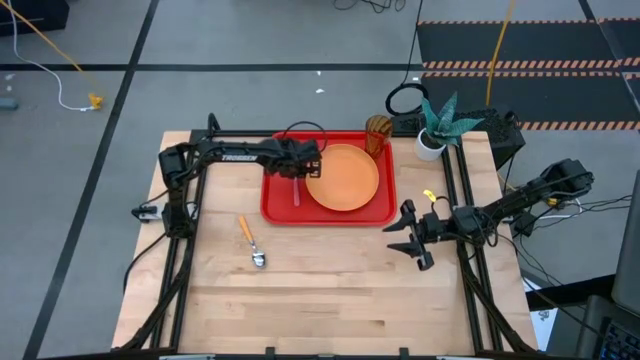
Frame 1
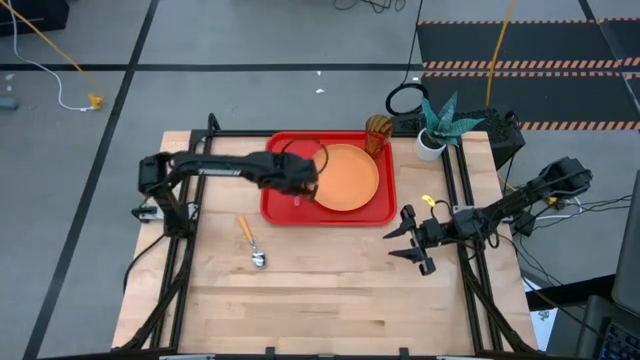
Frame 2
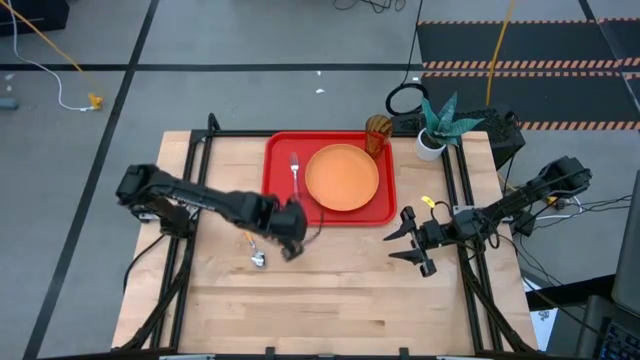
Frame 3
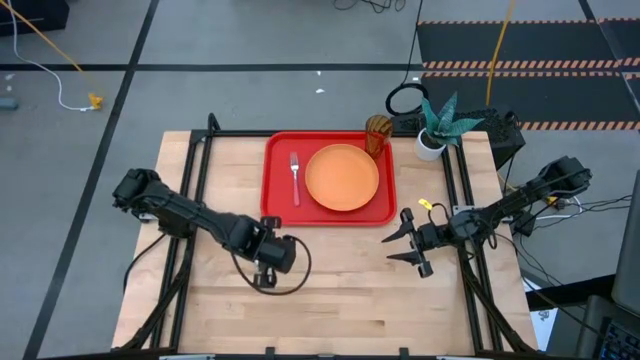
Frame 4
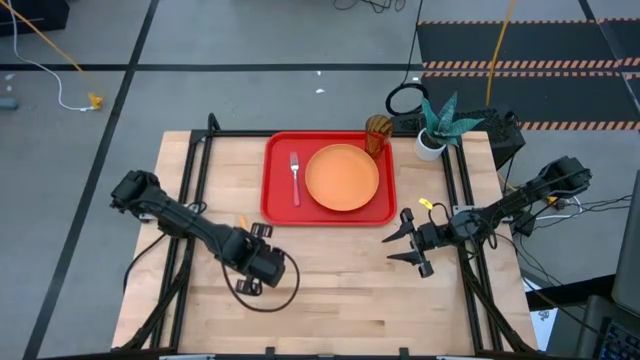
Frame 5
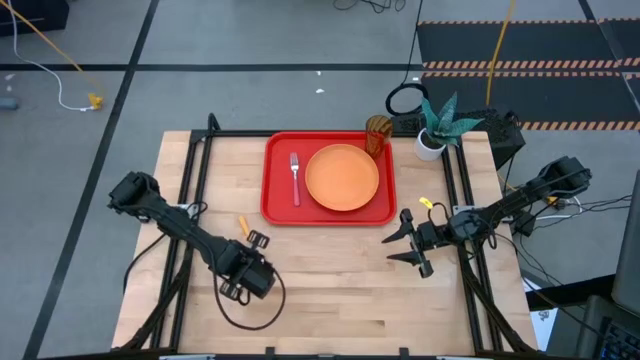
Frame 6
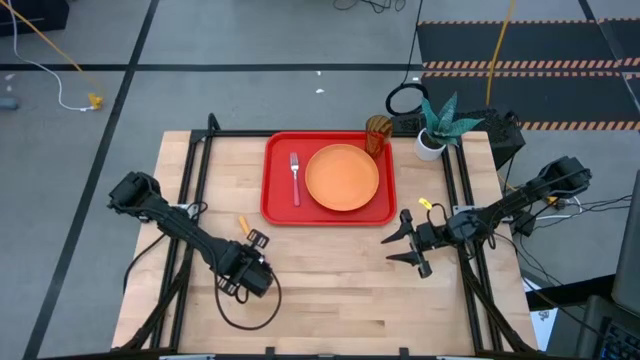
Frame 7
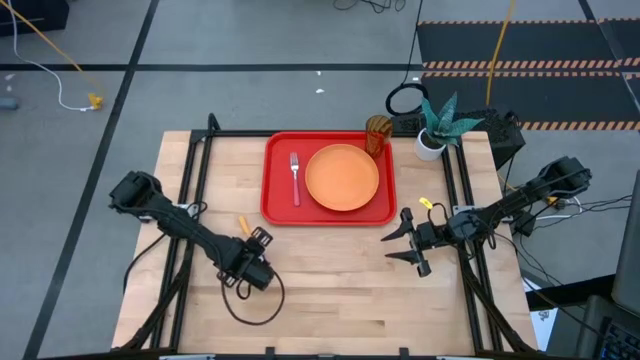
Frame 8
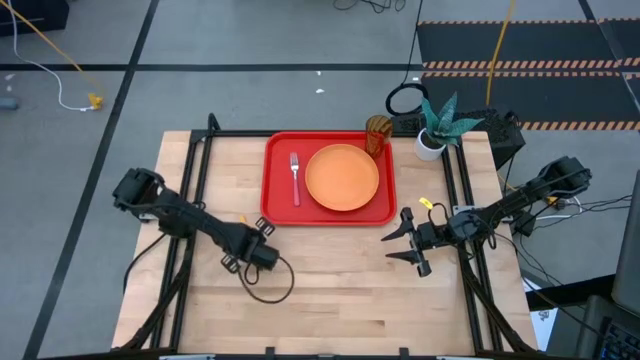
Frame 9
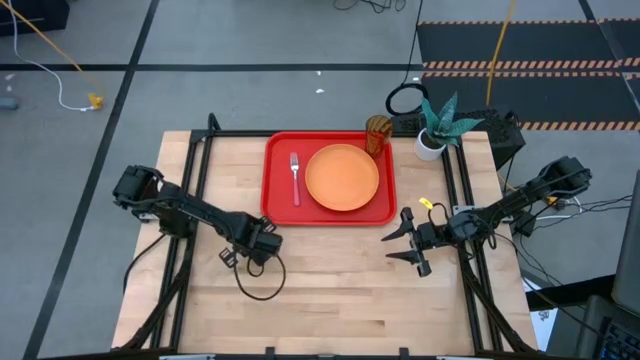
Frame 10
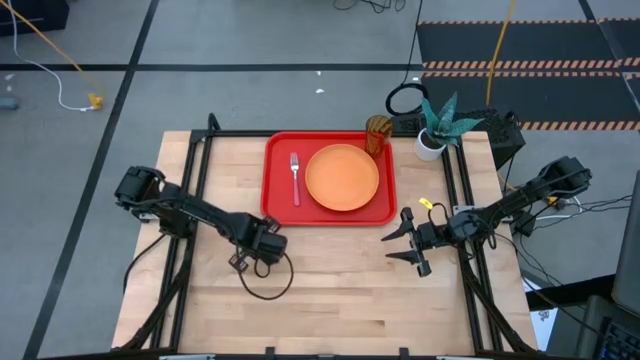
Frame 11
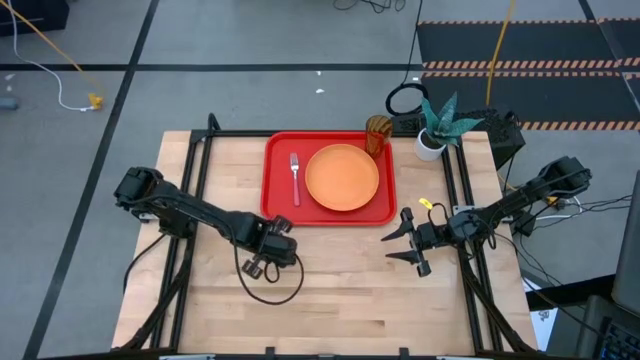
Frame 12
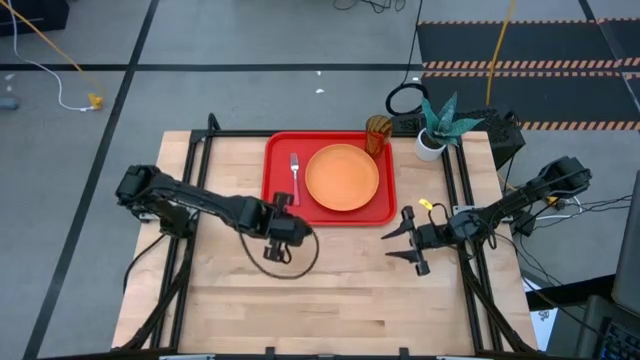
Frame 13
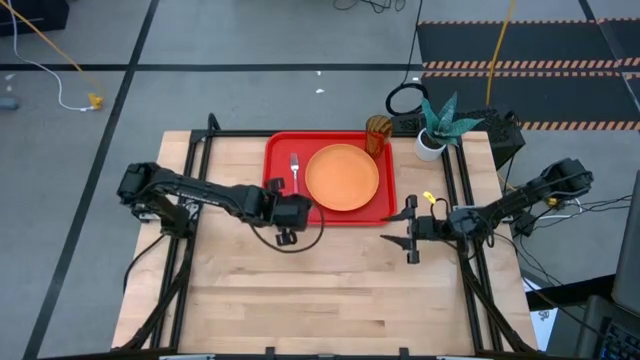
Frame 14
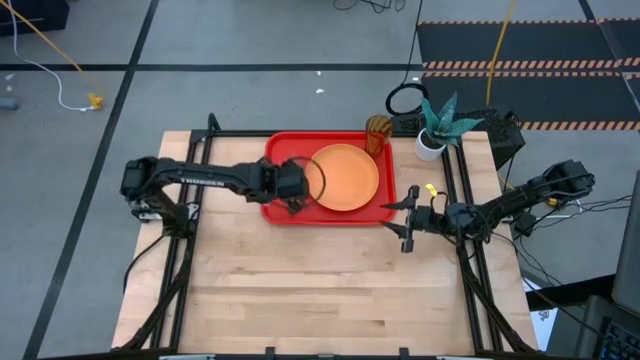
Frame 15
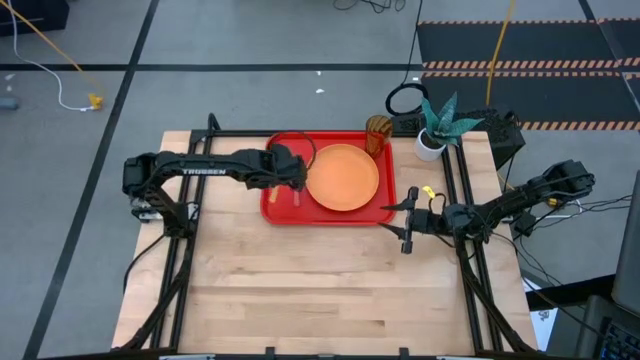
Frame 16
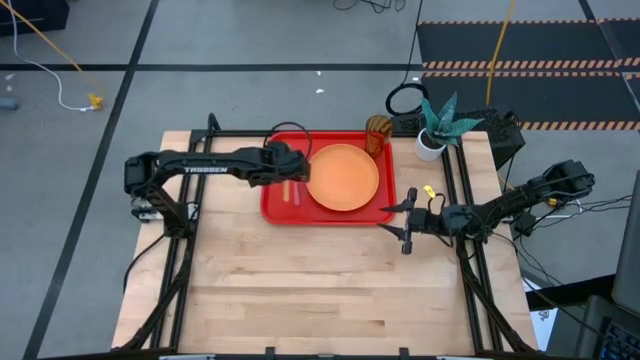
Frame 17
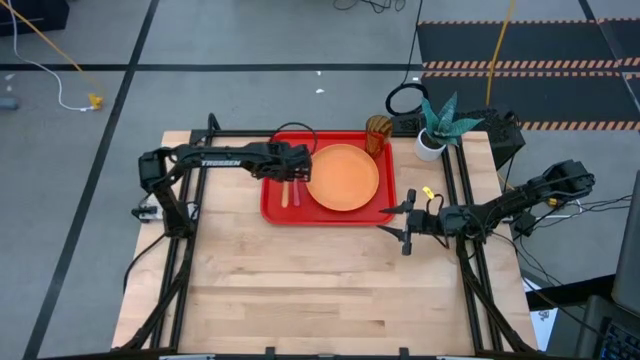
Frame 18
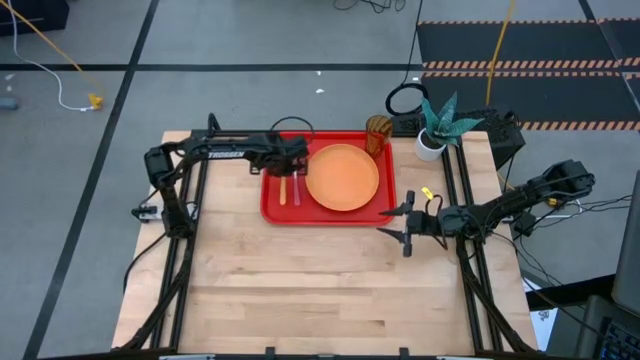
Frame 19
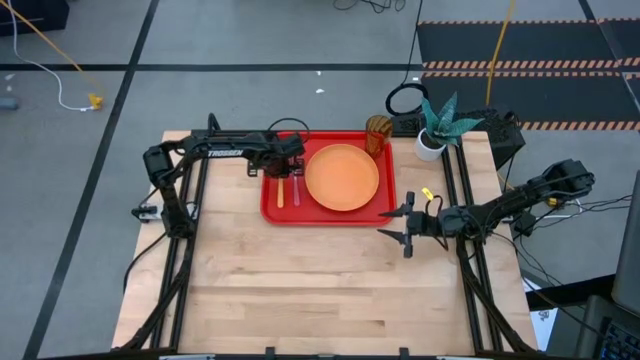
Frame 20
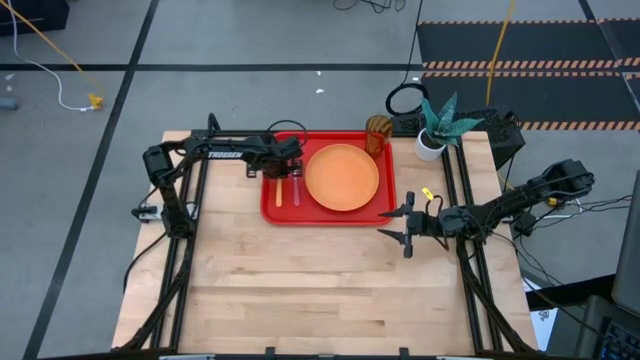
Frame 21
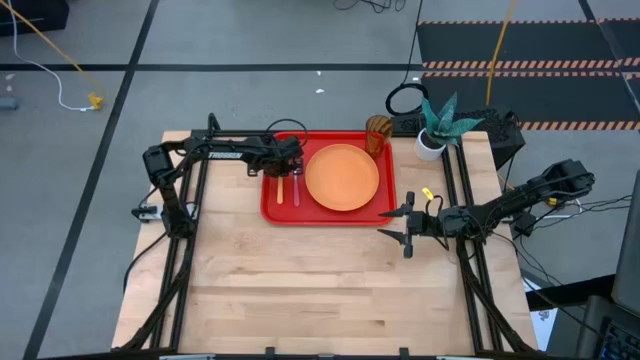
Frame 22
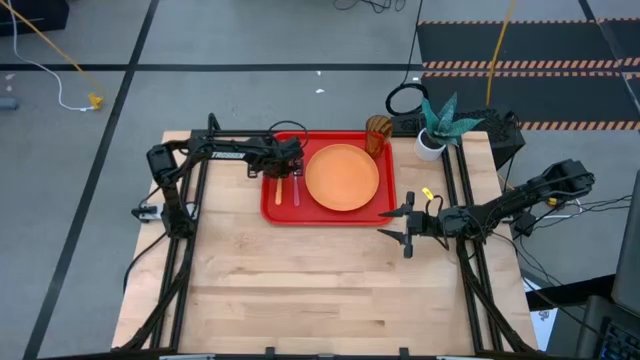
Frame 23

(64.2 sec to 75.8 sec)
Task: Pick and place plate/cup/fork/spoon on tray
Put the orange spoon on the red serving tray to the left of the pink fork

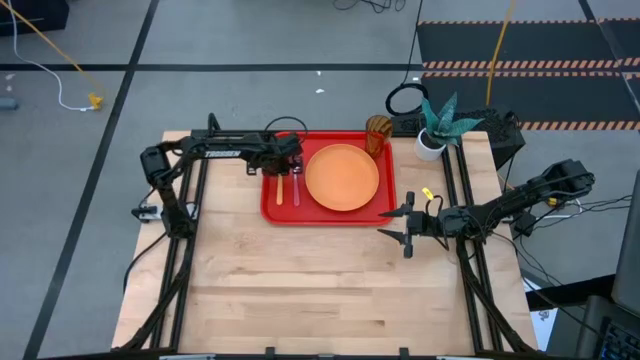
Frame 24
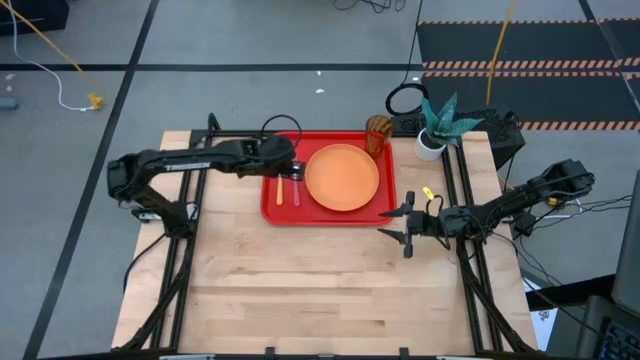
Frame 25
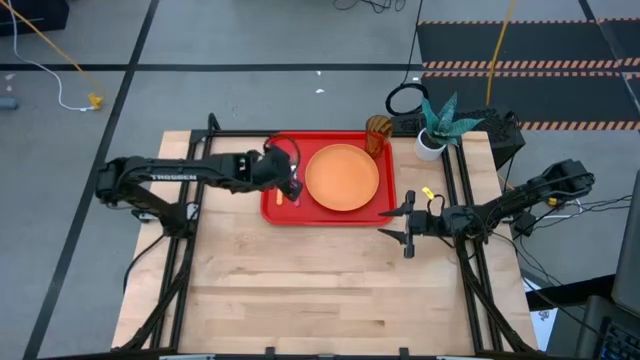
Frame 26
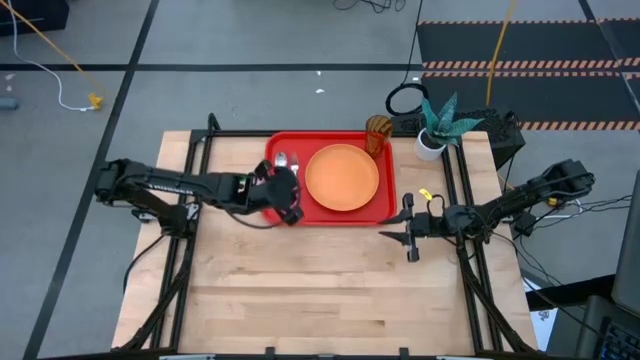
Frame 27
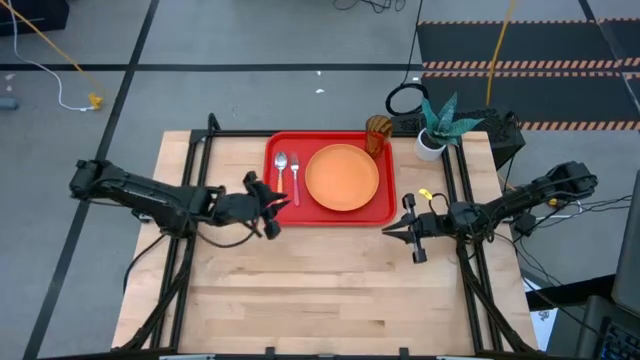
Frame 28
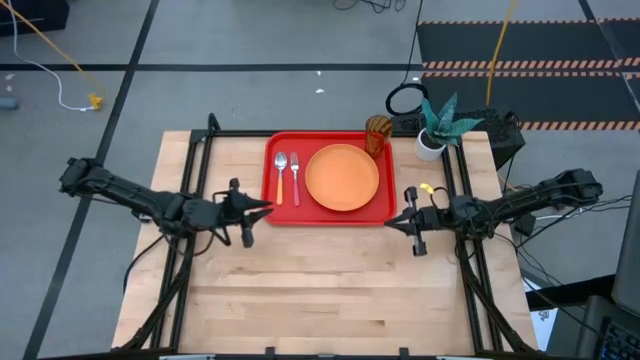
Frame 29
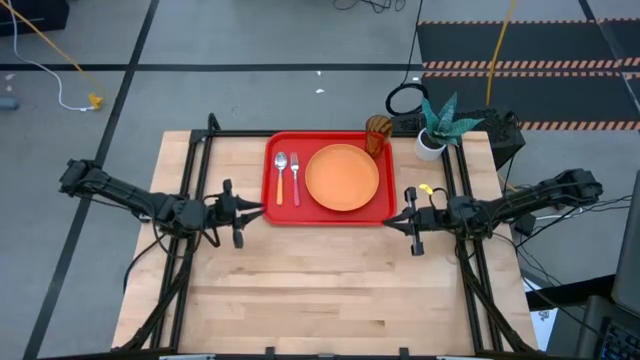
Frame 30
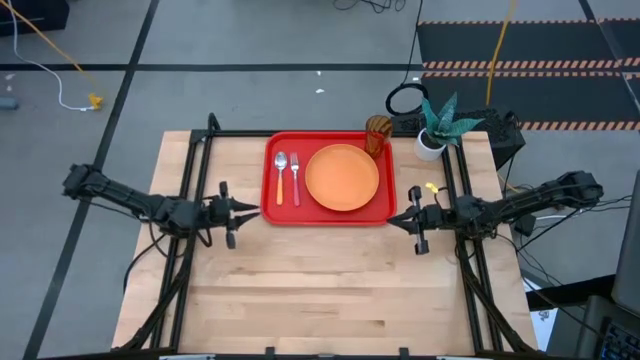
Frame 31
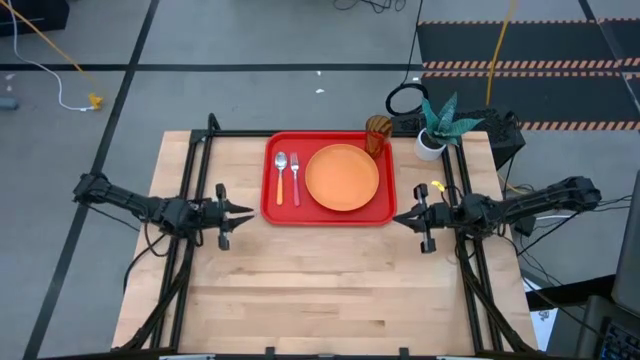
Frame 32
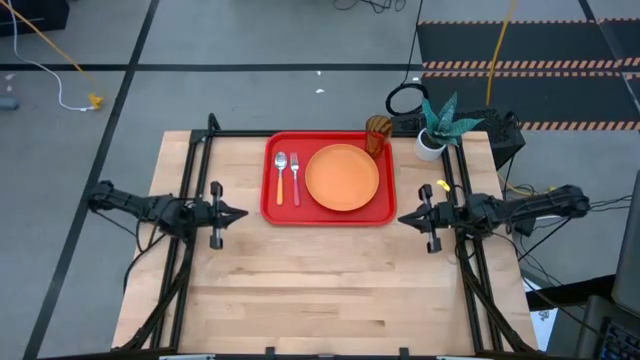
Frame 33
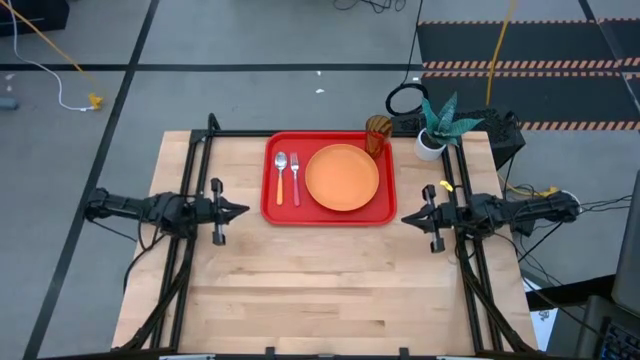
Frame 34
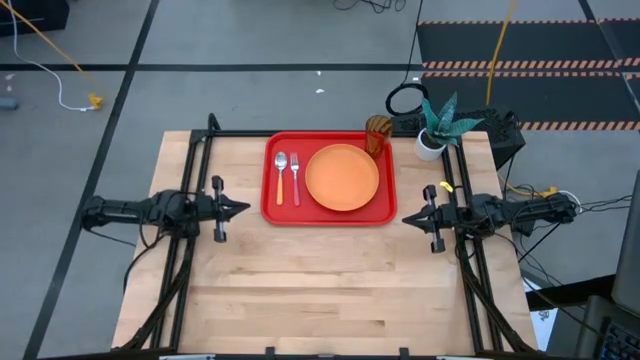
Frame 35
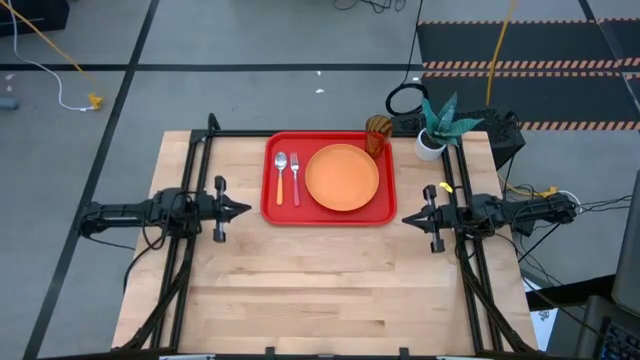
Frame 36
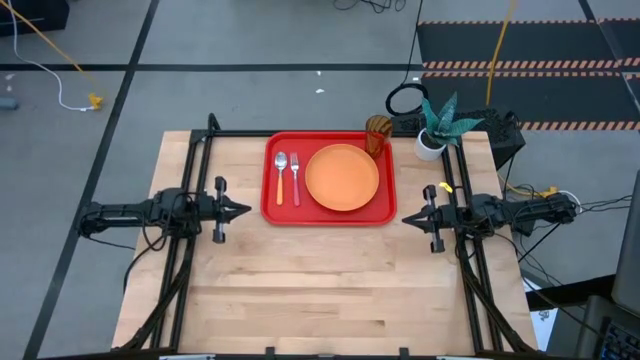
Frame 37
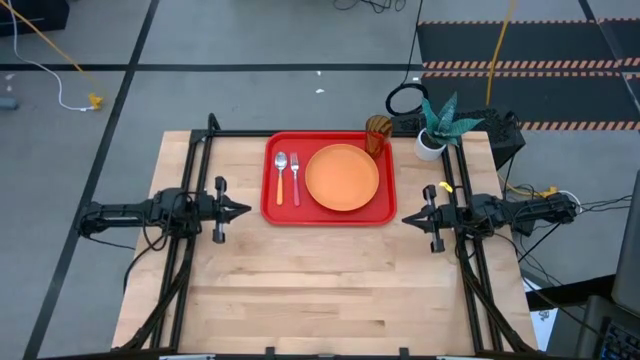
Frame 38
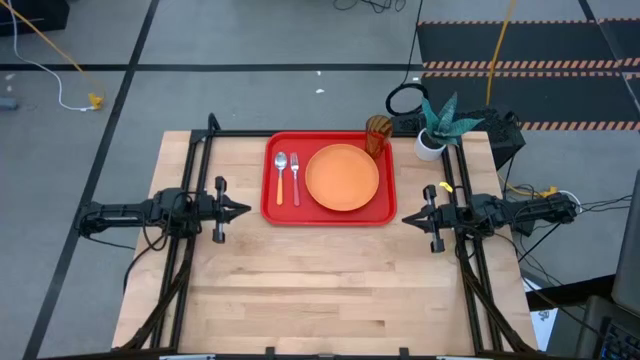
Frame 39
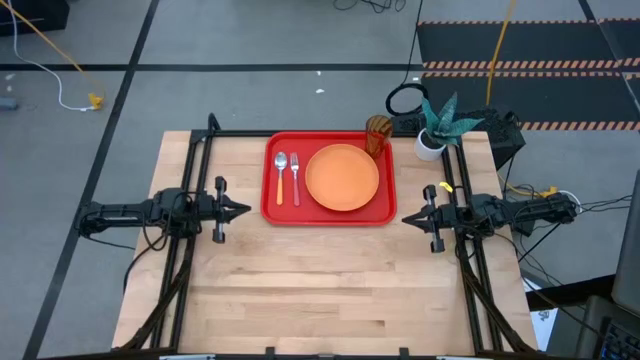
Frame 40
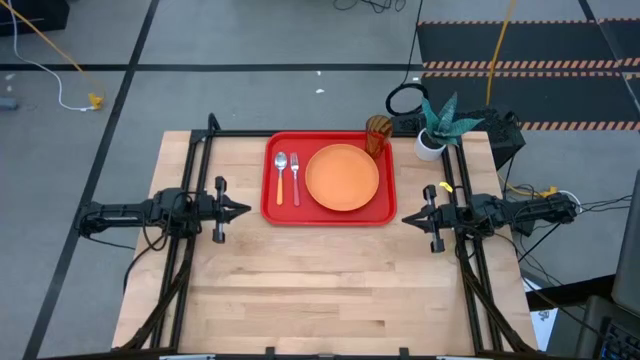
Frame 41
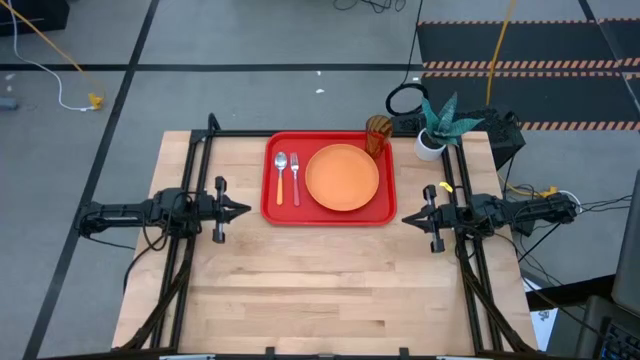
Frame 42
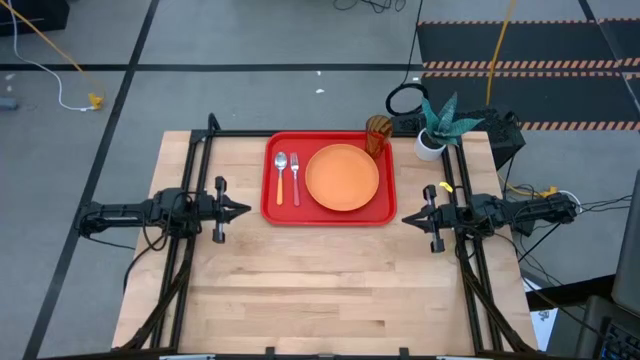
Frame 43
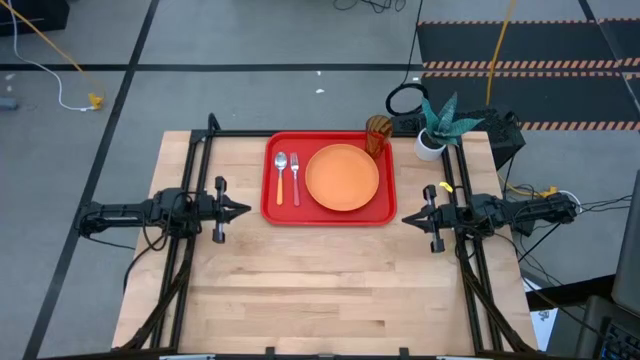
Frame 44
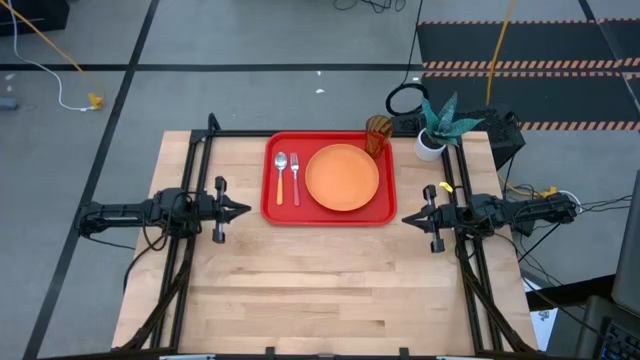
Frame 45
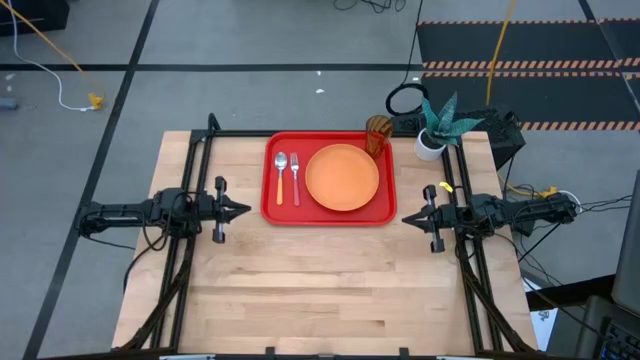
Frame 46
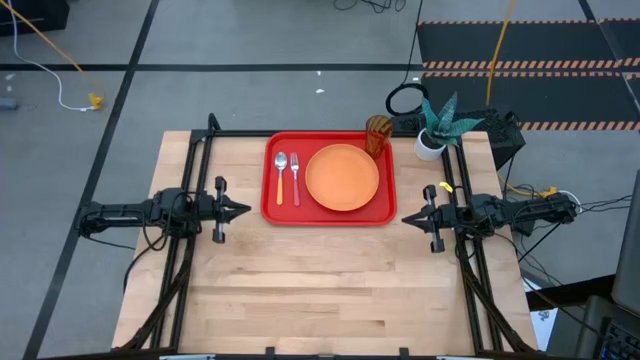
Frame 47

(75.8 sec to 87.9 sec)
Return to Home Position
